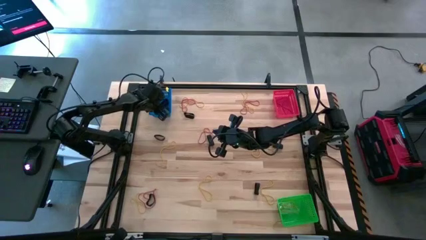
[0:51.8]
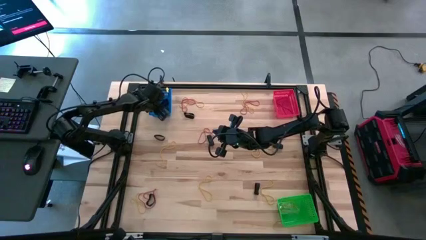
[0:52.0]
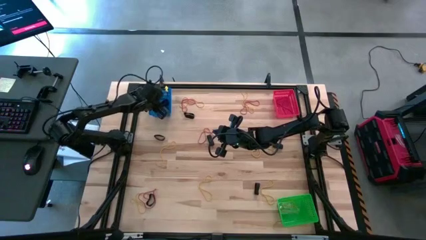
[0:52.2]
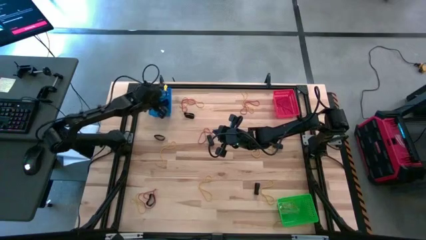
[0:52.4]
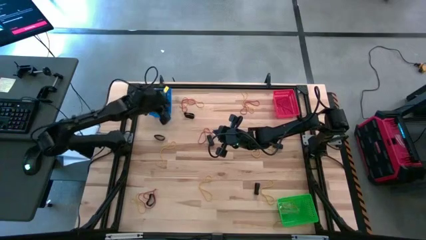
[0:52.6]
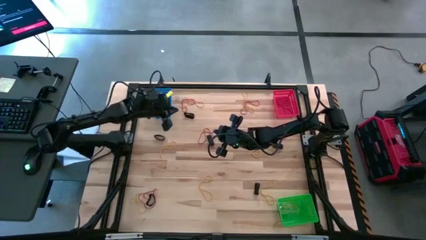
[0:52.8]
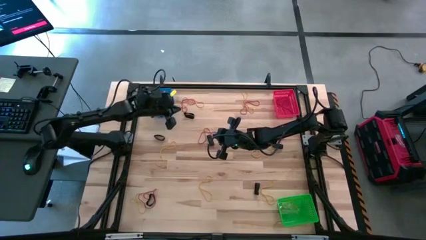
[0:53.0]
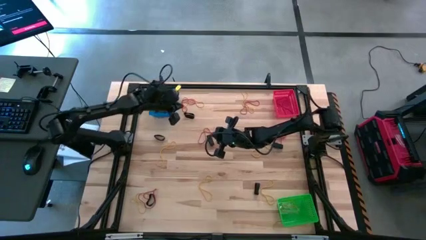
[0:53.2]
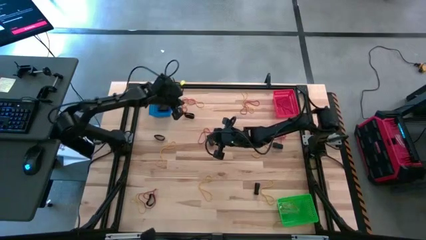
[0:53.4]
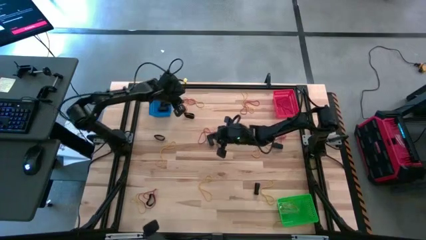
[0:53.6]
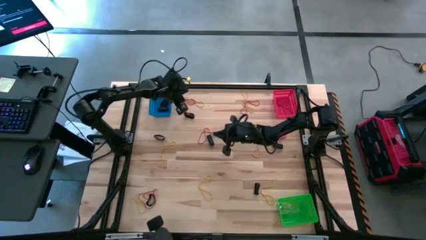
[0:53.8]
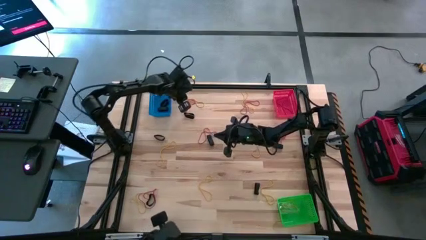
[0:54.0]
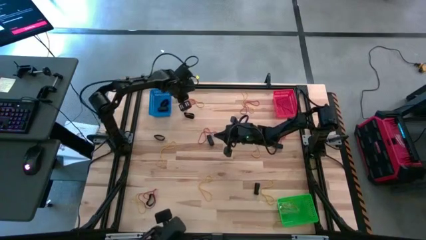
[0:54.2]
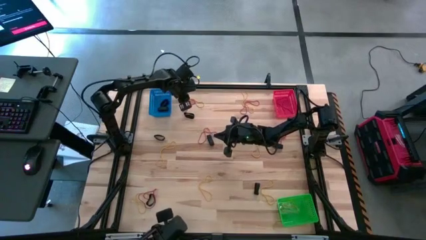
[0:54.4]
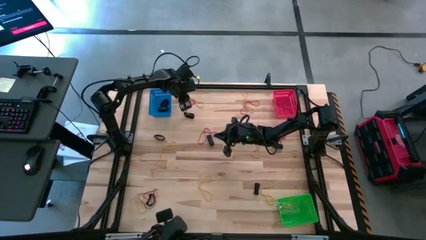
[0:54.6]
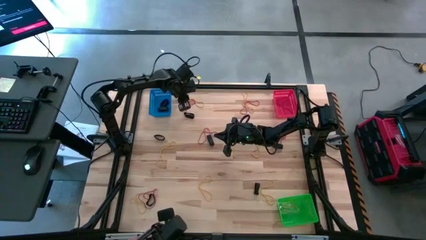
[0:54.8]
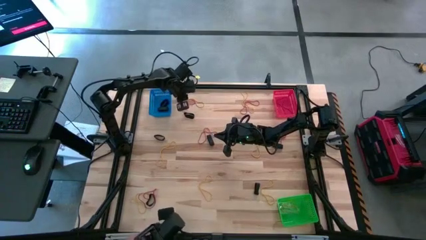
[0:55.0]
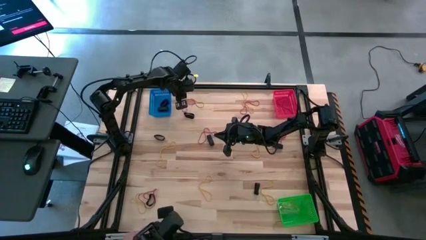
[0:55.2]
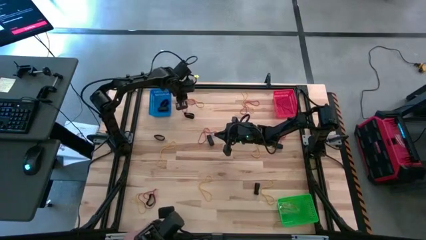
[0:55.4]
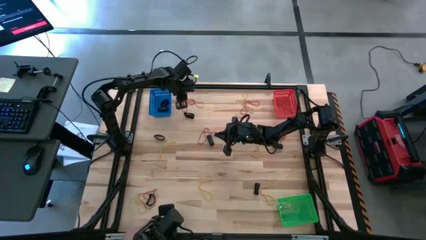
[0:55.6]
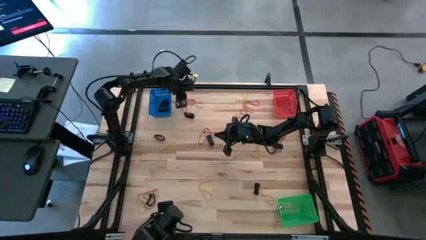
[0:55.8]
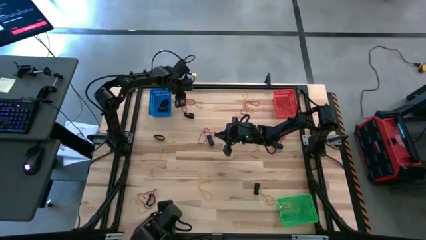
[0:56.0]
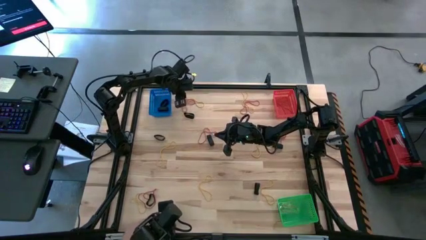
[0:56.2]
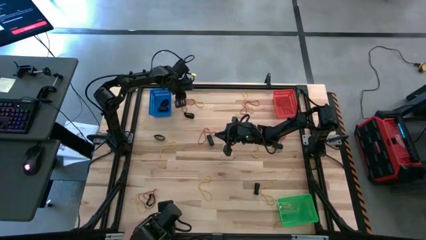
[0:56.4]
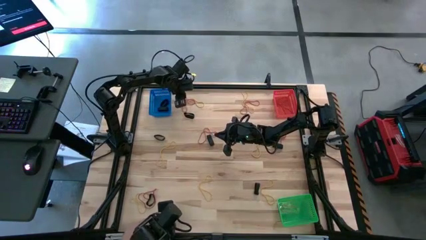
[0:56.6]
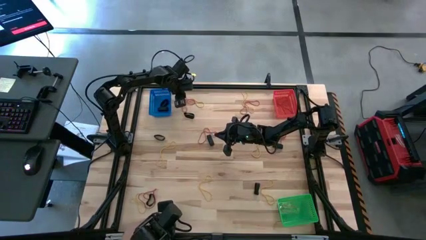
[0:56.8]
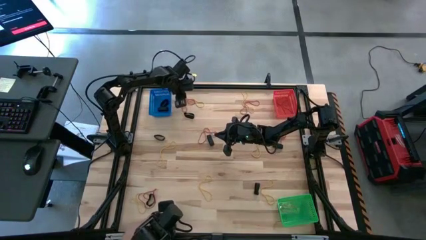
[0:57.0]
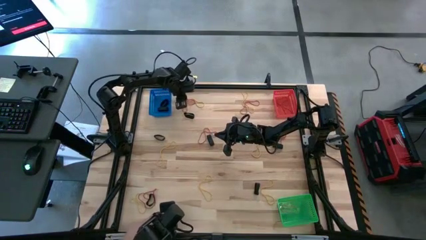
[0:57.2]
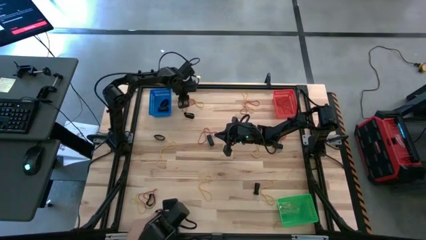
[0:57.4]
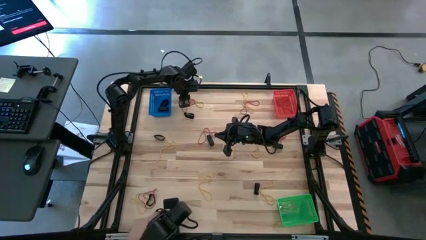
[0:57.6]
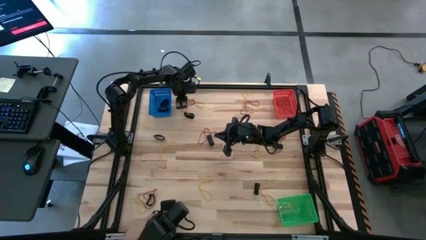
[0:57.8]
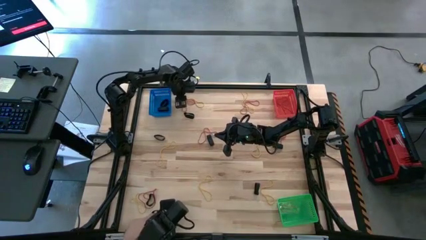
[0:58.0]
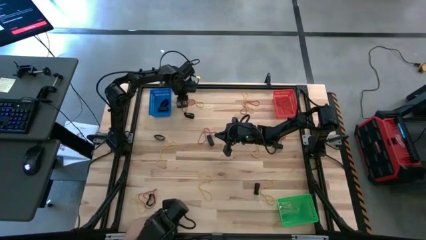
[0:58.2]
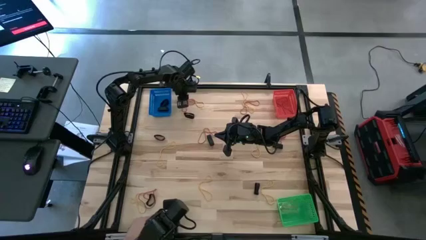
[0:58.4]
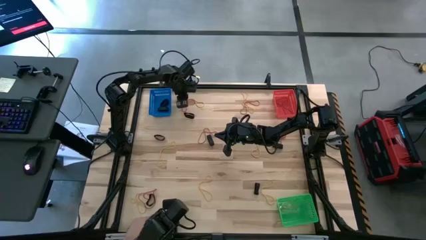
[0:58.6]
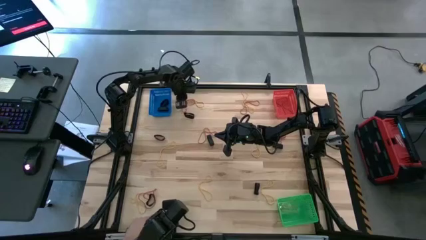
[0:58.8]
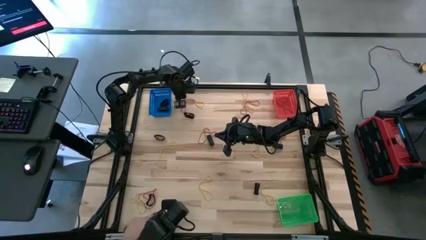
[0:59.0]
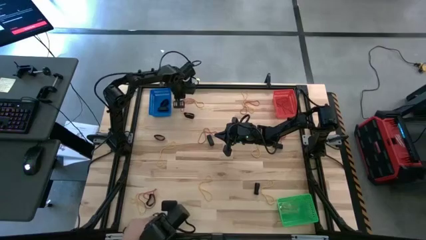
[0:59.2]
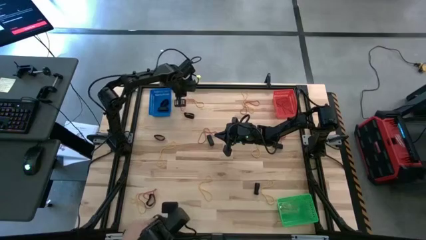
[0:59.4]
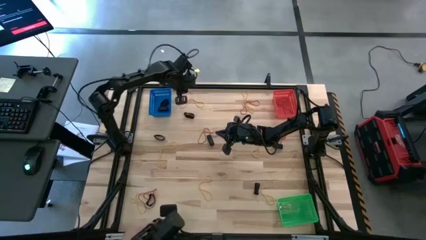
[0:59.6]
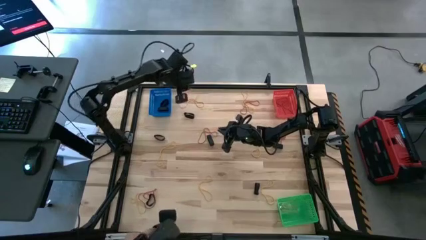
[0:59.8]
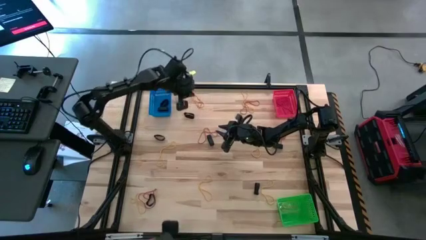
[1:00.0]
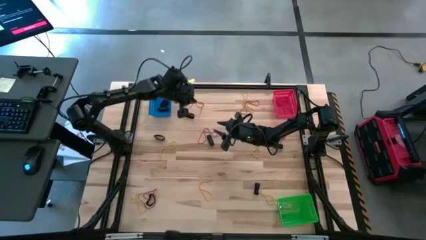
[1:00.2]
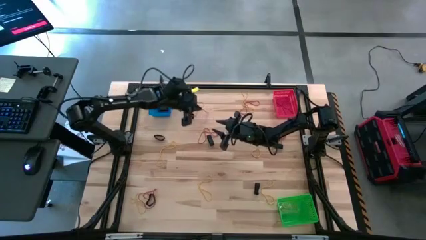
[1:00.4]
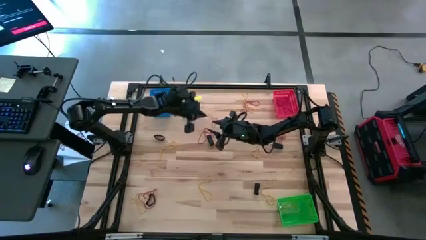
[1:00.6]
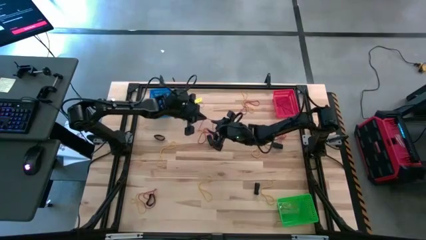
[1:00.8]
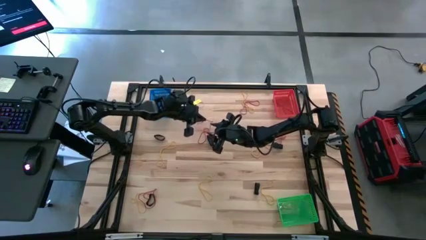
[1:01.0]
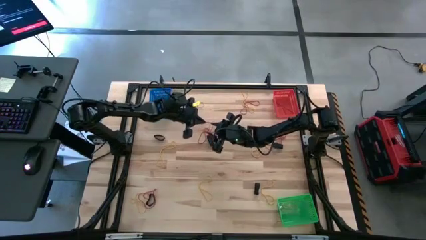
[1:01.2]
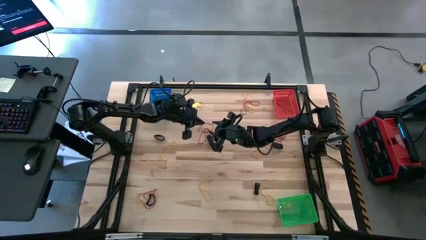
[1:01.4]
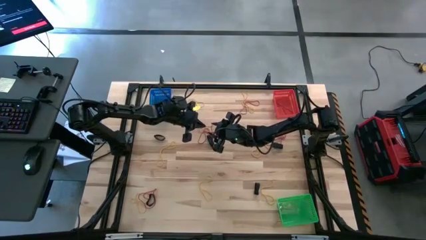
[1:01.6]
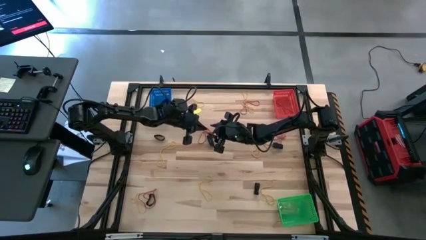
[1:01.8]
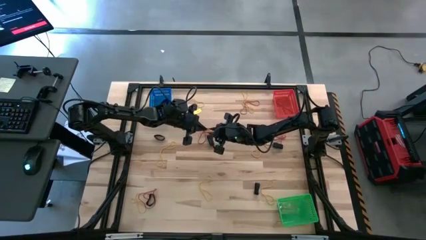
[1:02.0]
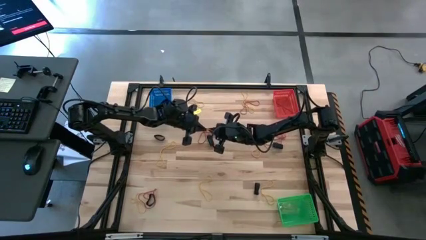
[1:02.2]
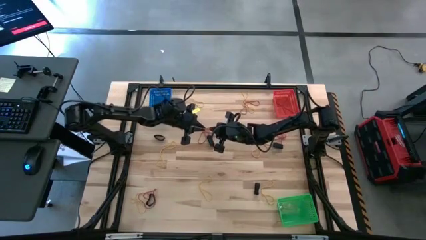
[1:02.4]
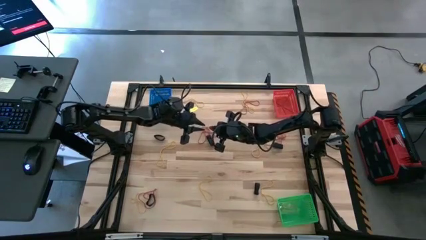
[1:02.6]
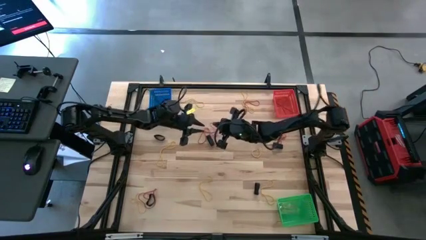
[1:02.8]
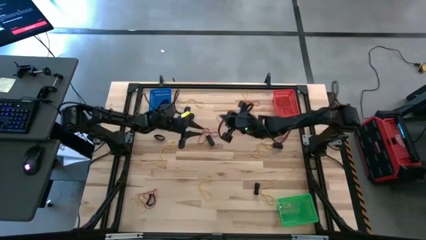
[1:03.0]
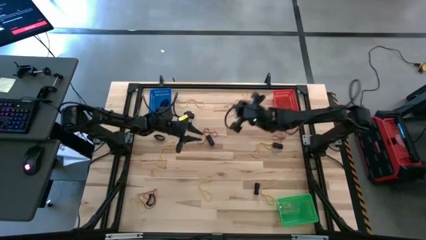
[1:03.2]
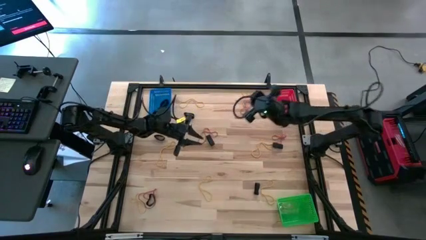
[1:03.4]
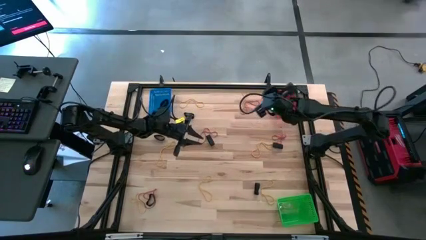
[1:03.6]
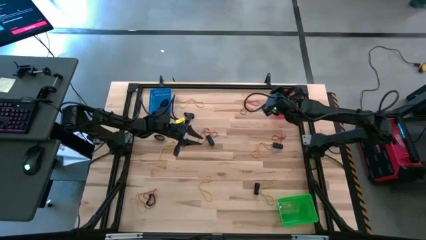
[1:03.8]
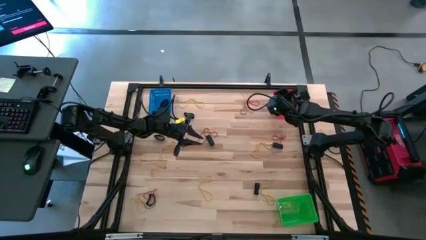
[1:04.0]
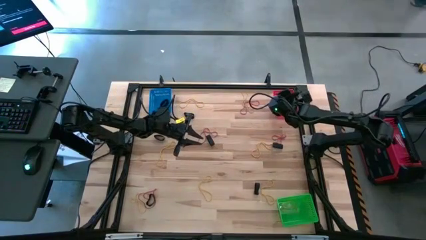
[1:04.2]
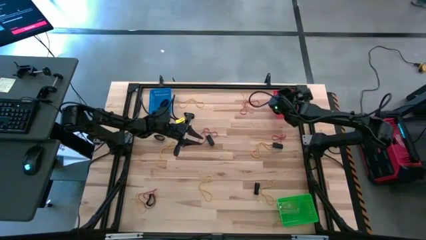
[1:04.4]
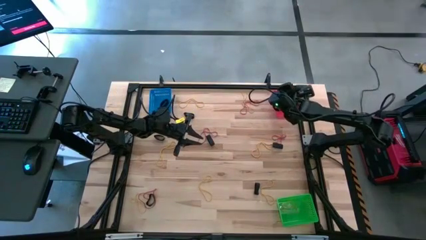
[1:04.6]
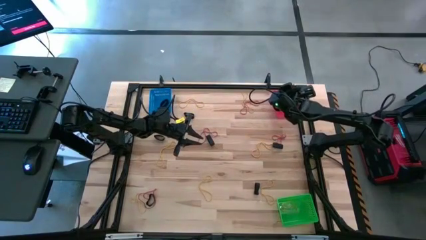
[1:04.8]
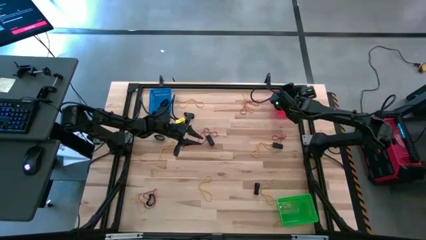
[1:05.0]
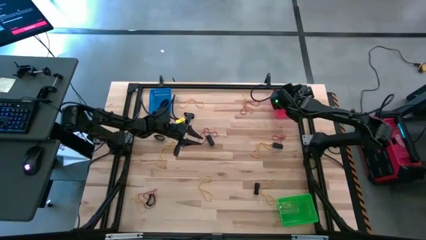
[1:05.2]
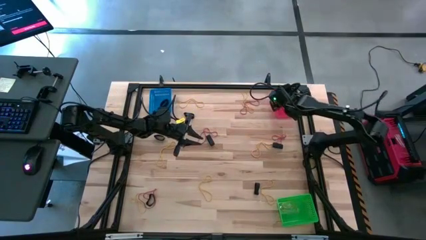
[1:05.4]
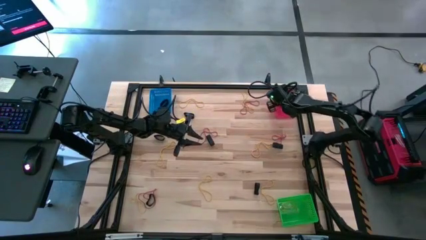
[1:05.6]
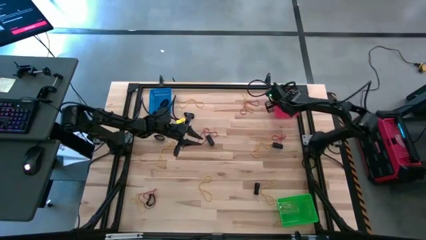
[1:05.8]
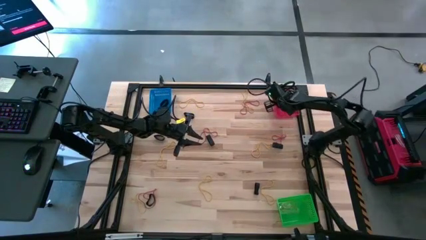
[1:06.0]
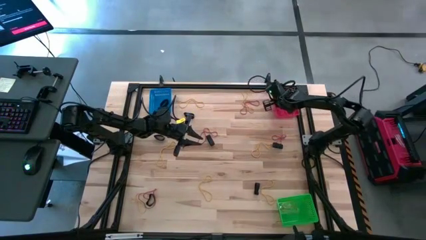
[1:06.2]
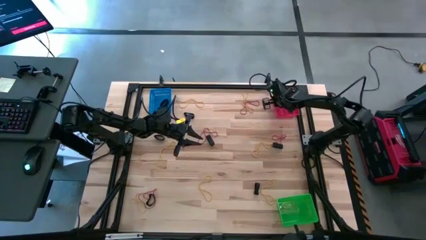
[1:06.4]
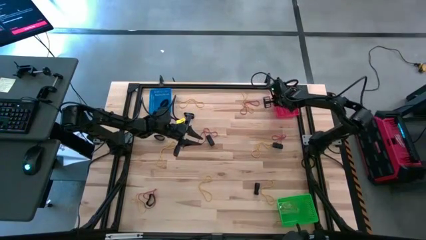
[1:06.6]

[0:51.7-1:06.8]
Task: Sort rubber bands into baskets
Put the red rubber band into the red bin
